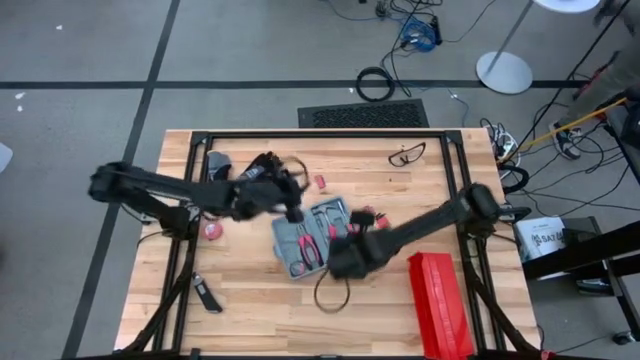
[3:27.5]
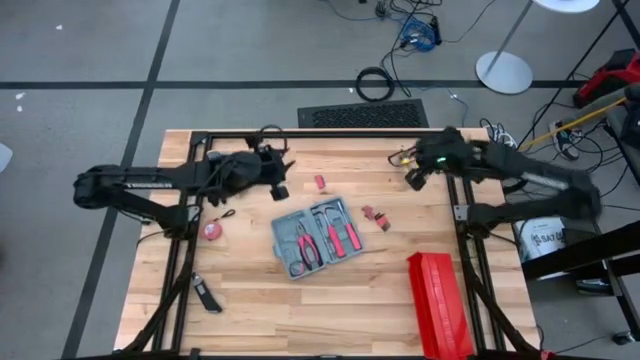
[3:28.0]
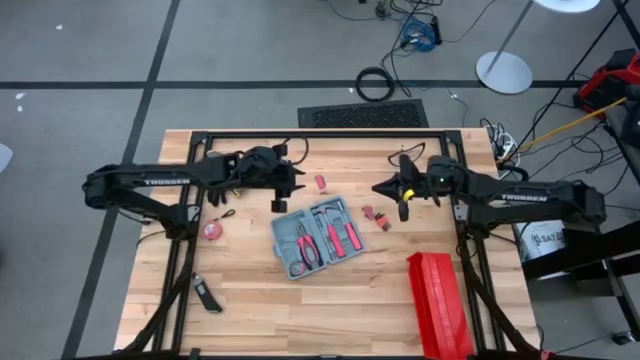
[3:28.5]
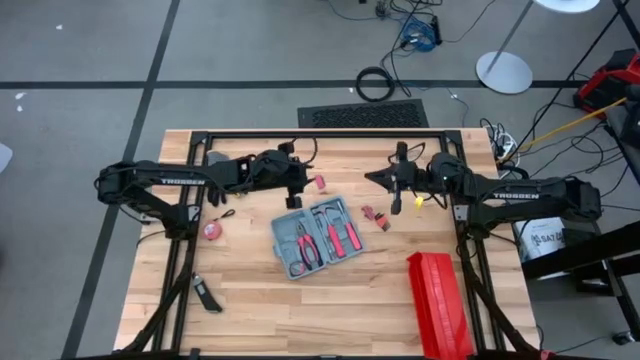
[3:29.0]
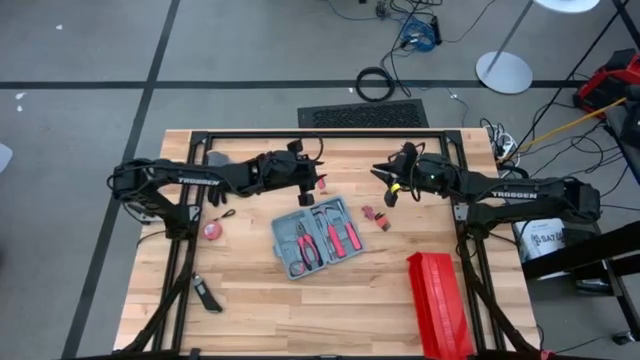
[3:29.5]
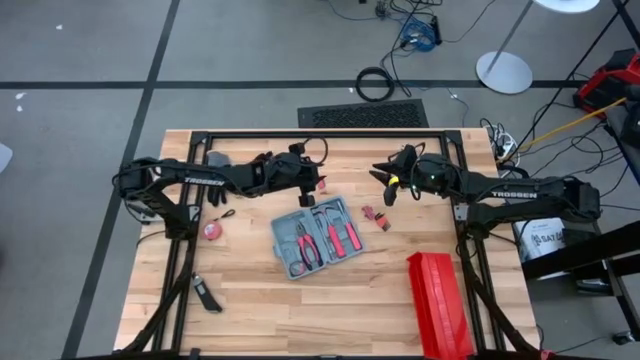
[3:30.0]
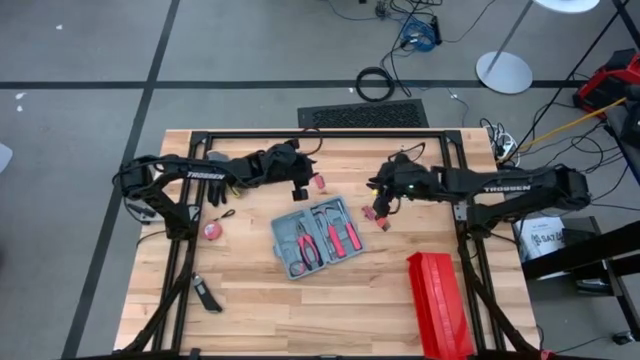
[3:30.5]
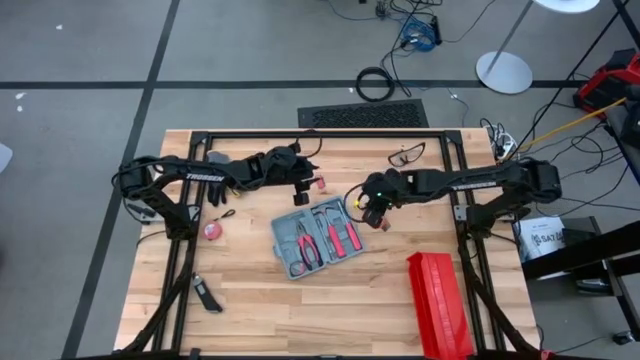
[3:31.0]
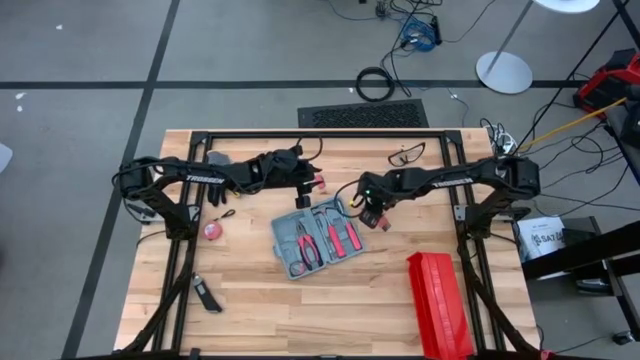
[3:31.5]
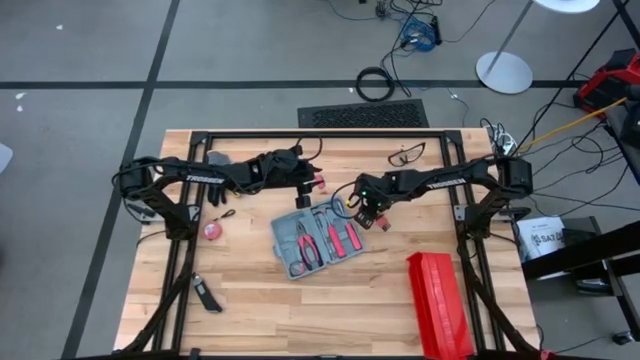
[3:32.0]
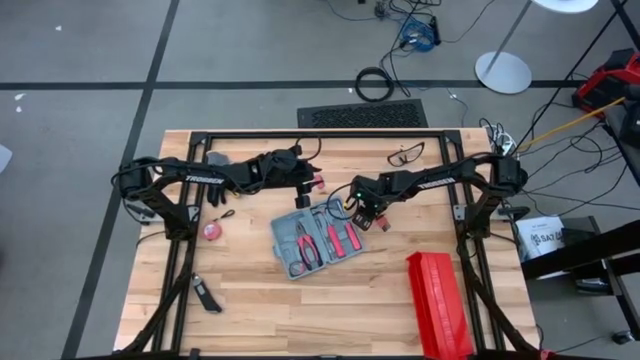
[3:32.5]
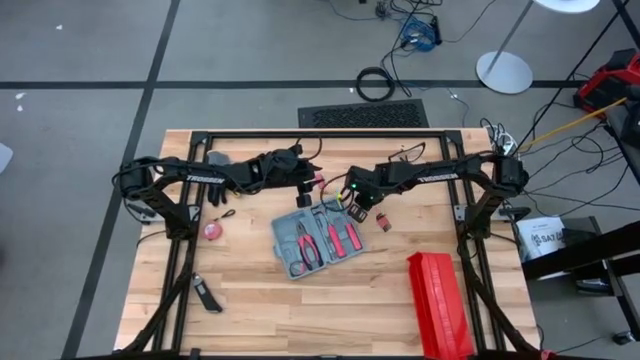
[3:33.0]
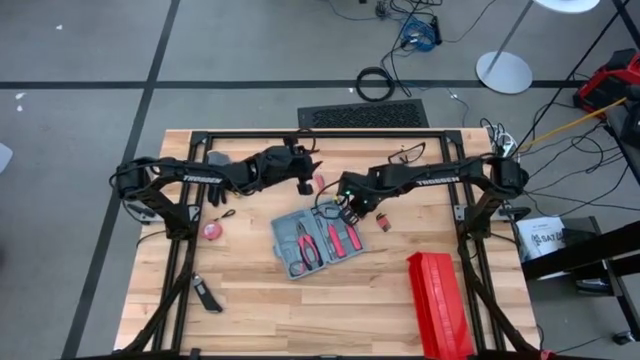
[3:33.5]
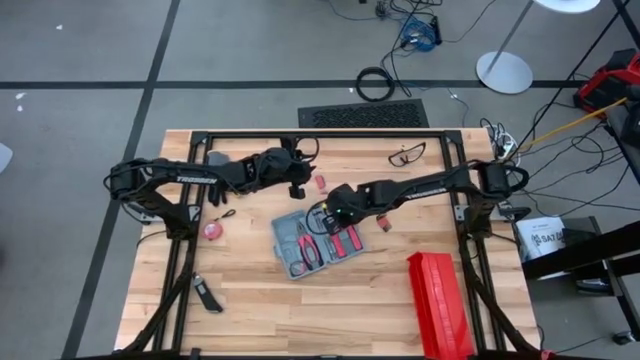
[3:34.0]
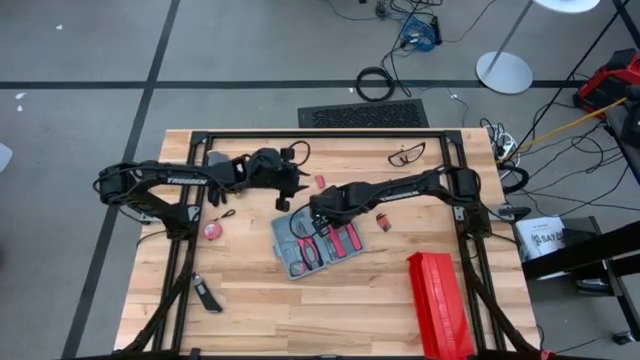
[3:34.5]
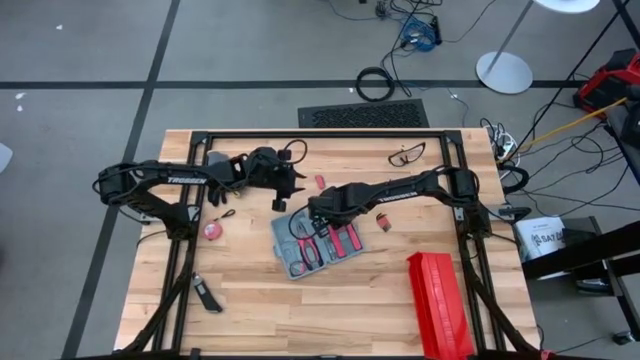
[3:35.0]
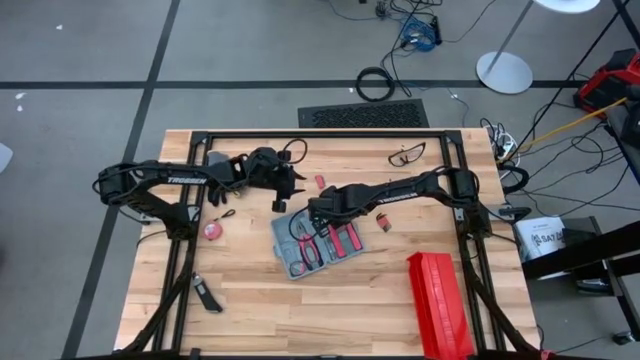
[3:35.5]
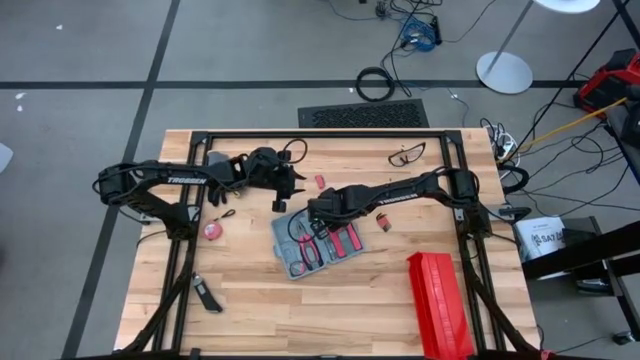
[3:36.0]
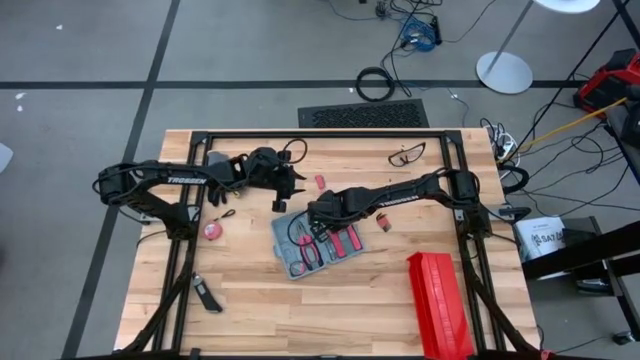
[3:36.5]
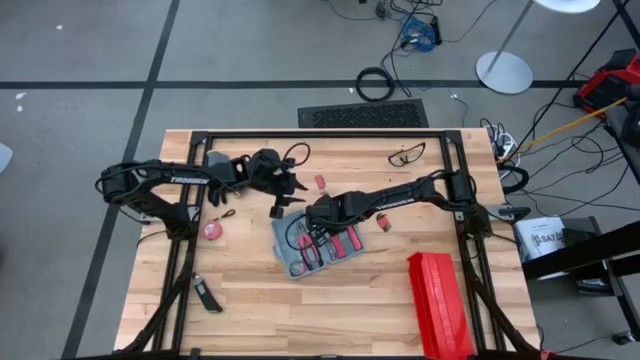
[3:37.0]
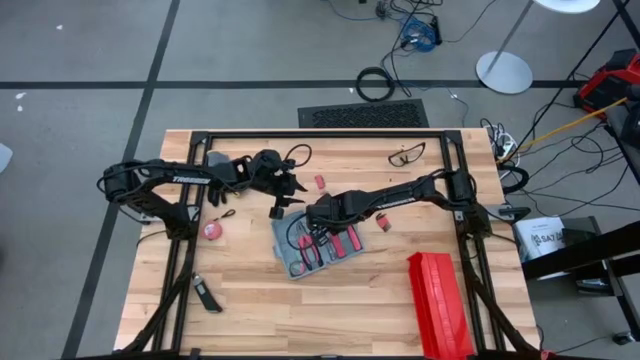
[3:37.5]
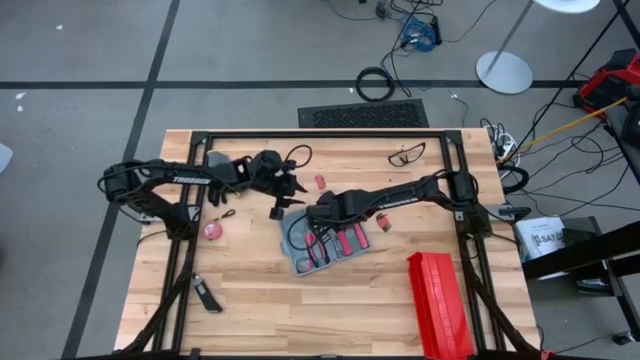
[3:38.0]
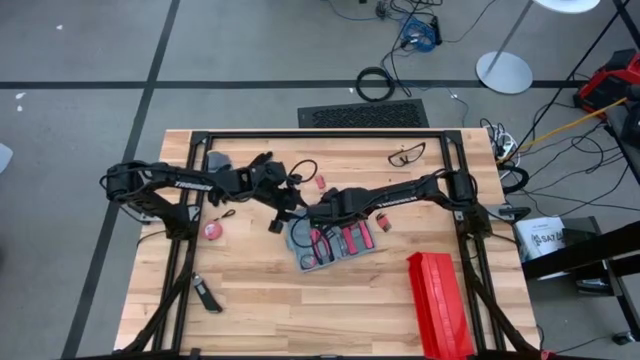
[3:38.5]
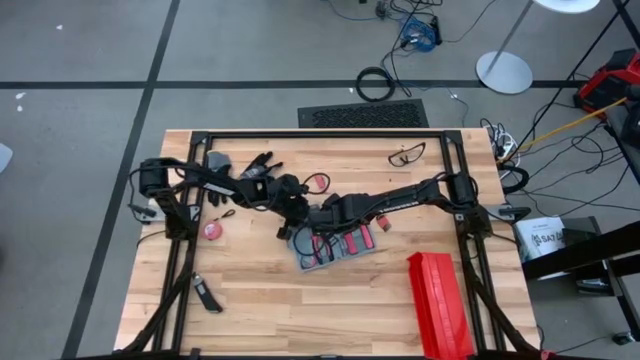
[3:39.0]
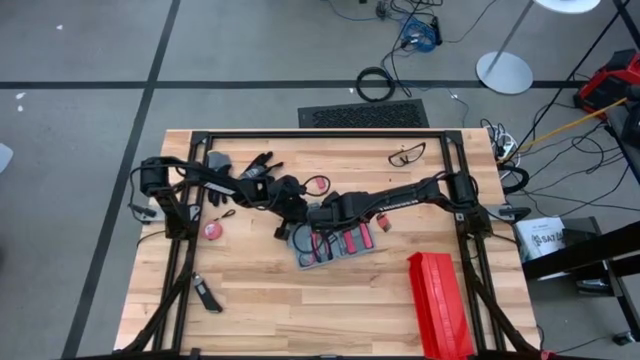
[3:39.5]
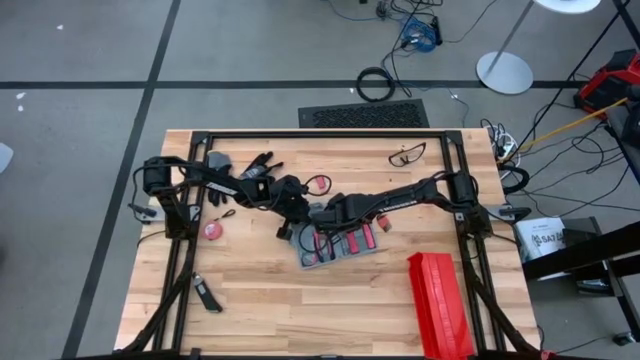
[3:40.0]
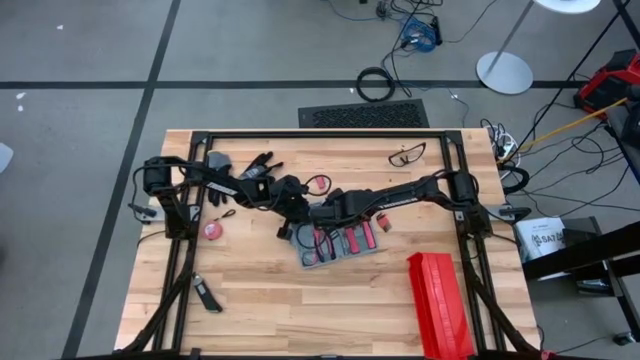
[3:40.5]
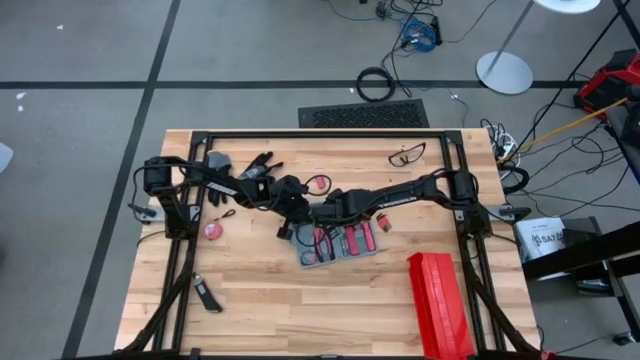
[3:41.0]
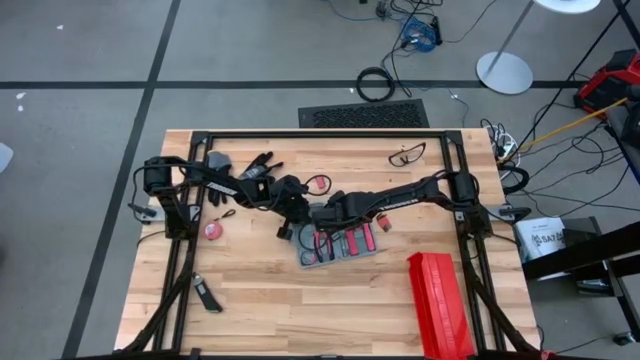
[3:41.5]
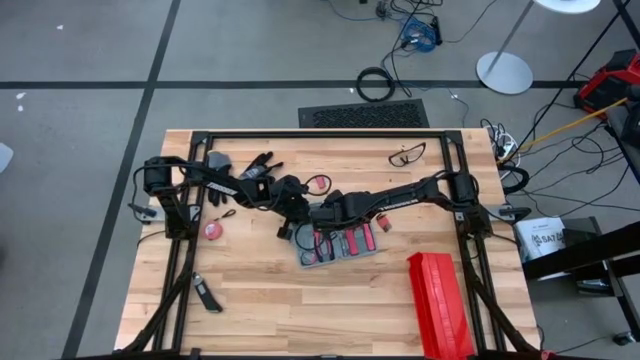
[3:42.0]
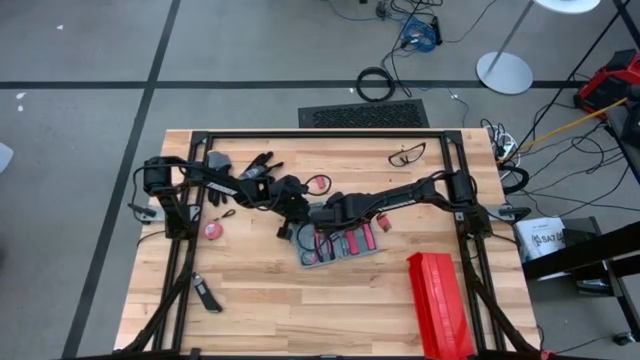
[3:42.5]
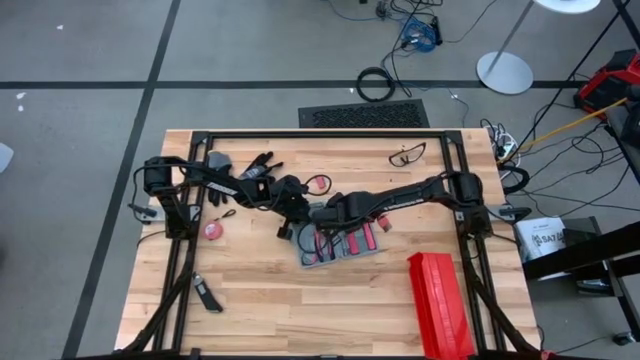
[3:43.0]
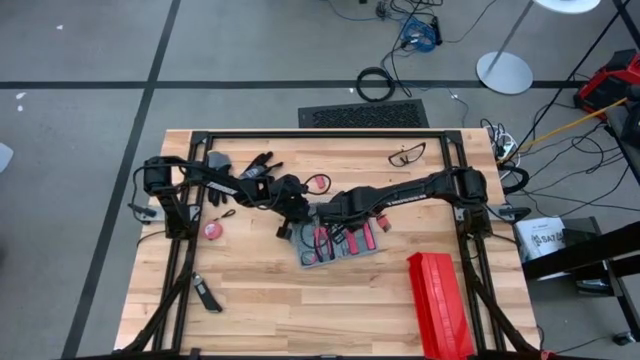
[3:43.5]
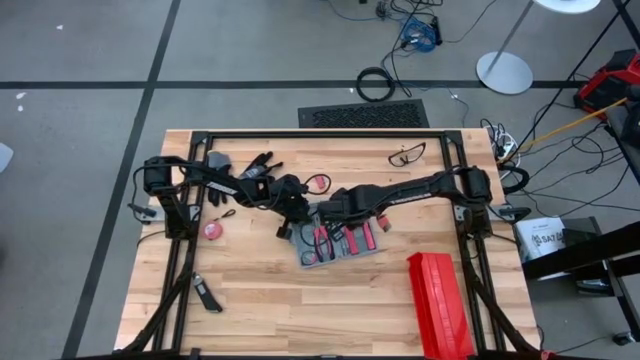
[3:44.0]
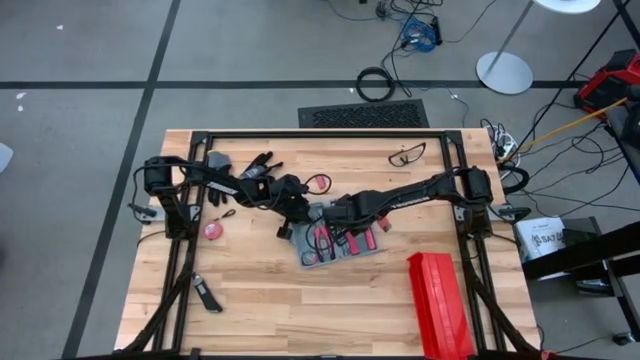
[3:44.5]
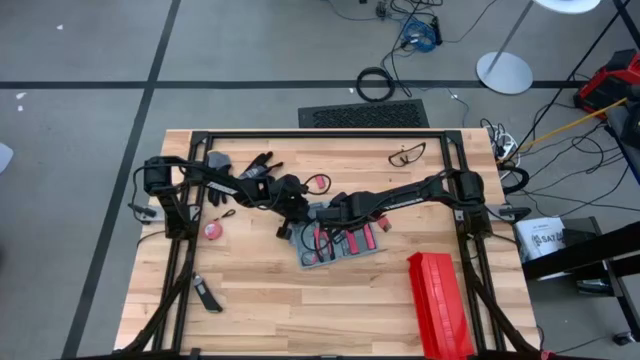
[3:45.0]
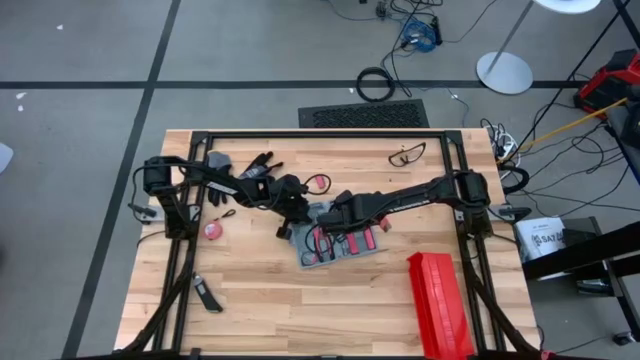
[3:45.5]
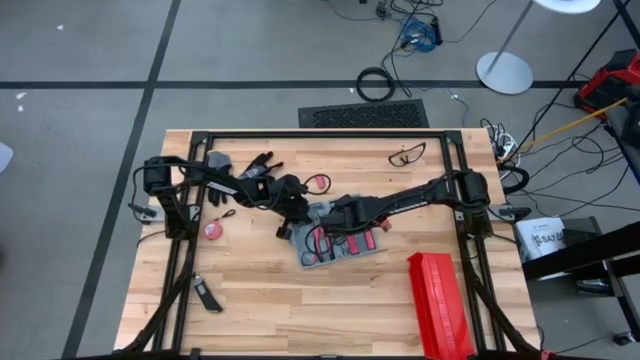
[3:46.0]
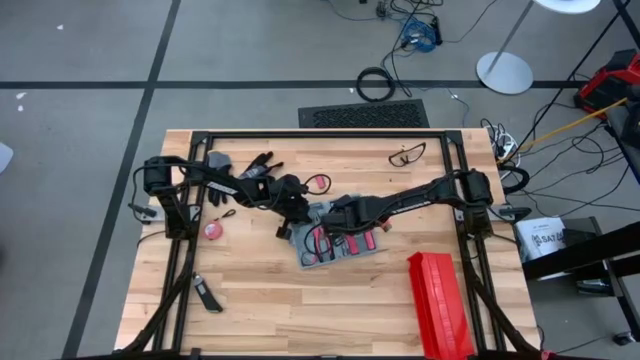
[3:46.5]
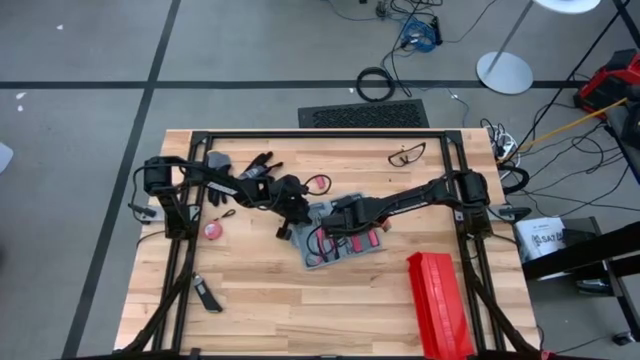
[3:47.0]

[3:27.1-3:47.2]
Task: prefit tool cases
Put the red terminal block into the gray prefit tools case

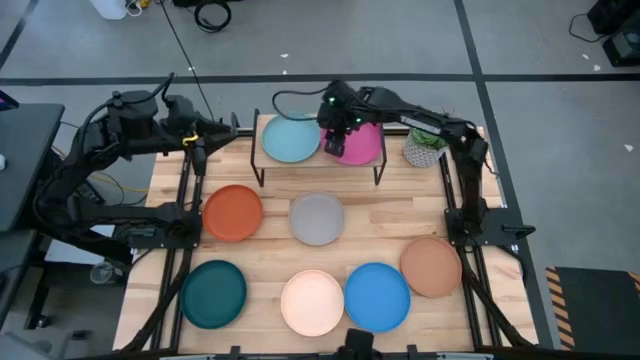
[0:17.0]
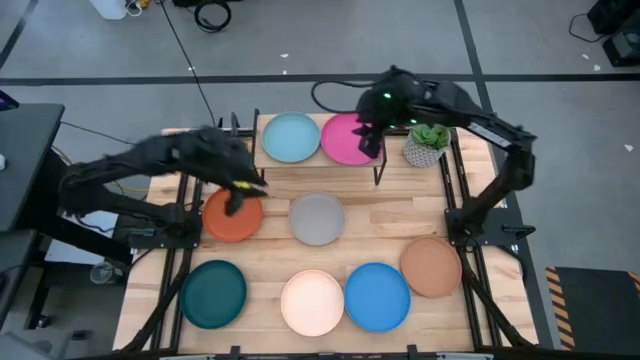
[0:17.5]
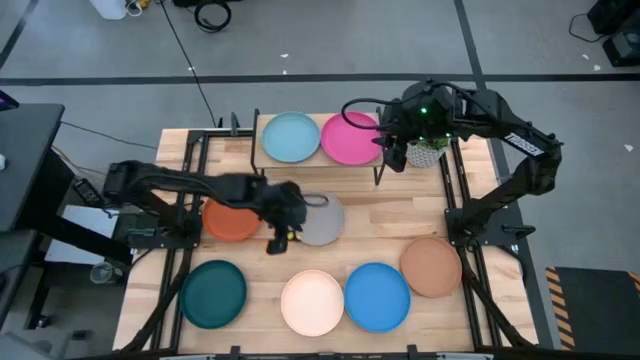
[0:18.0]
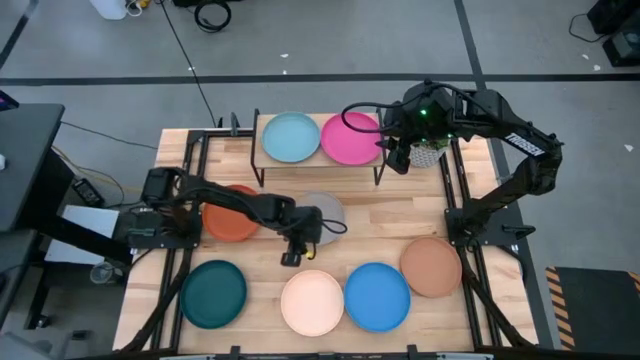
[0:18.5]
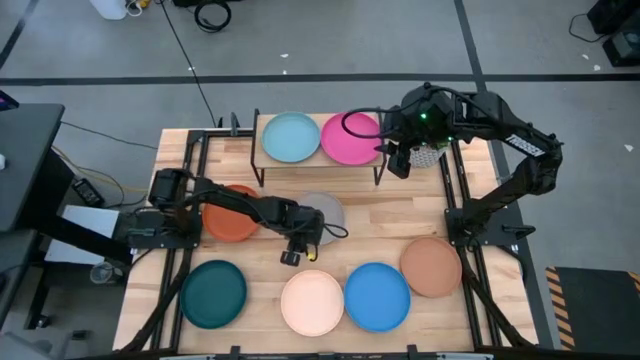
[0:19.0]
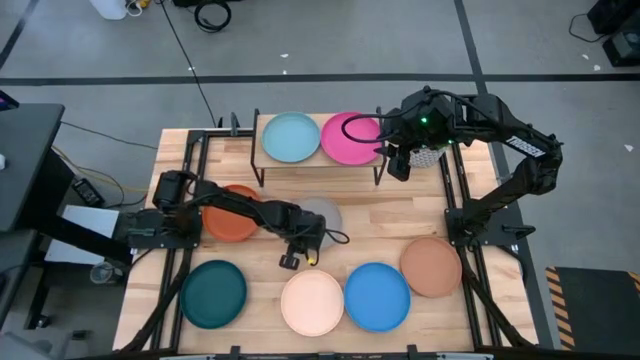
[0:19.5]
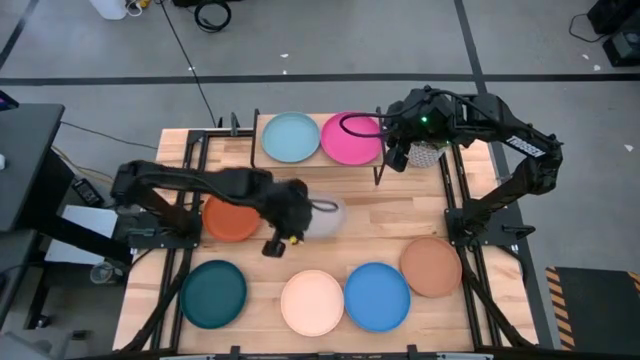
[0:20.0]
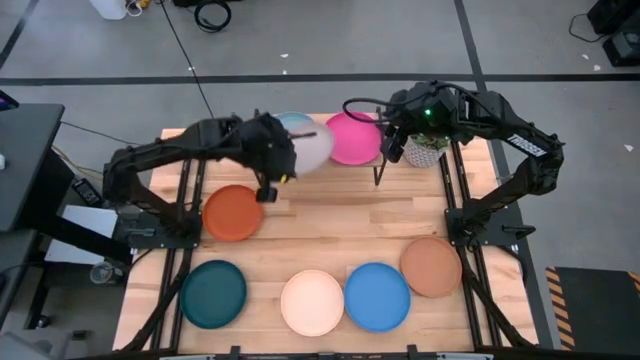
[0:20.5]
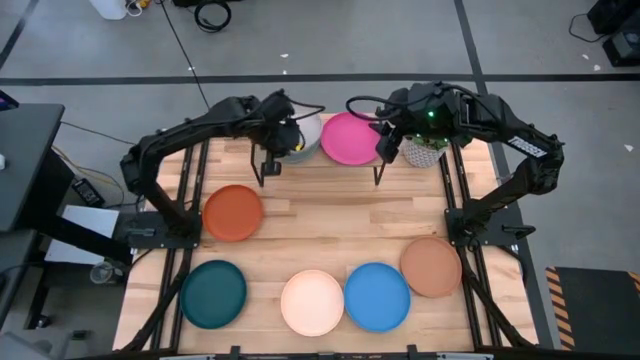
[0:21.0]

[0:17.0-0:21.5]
Task: Place and stack plates onto a shelf
Stack the gray plate on top of the light blue plate on the shelf
